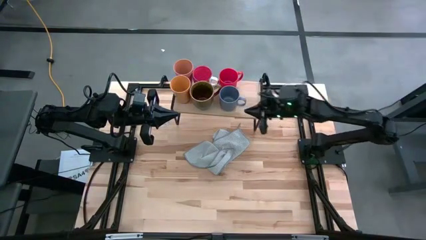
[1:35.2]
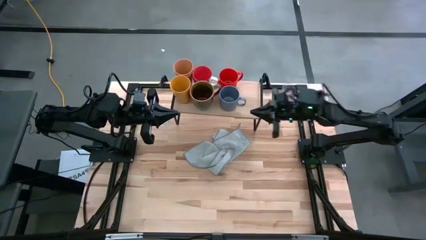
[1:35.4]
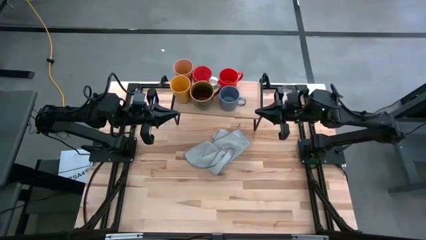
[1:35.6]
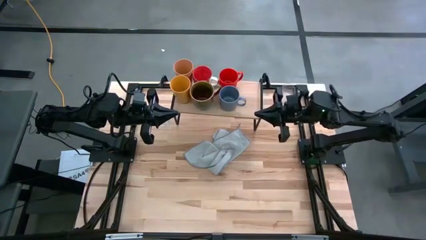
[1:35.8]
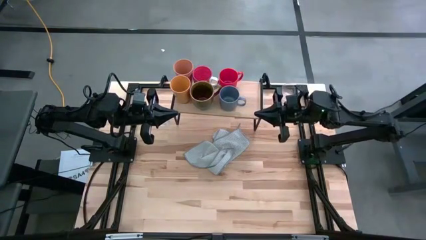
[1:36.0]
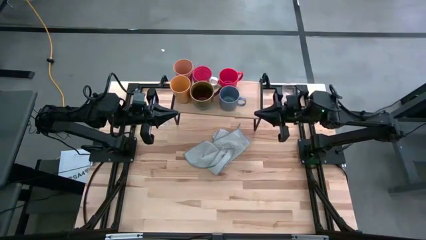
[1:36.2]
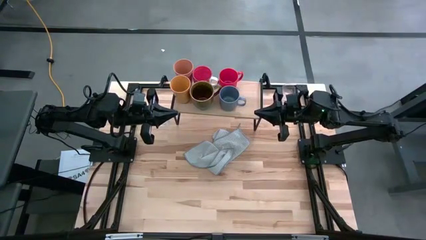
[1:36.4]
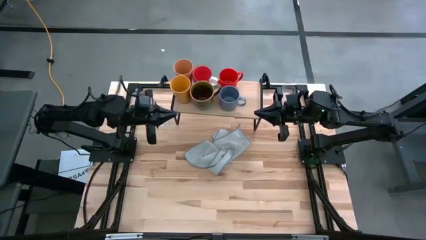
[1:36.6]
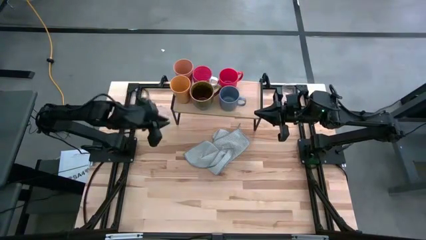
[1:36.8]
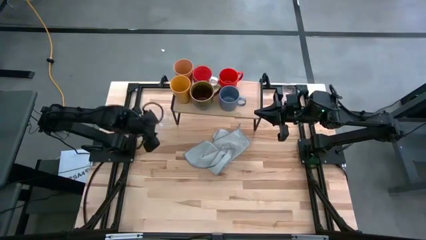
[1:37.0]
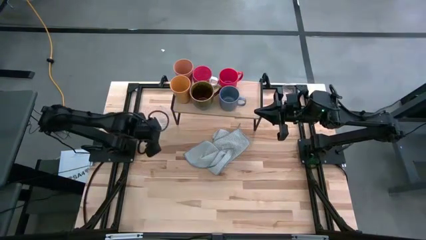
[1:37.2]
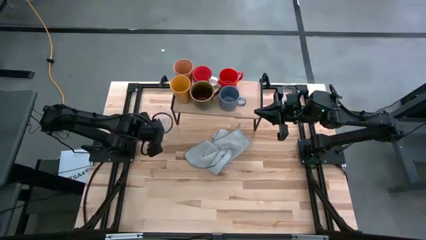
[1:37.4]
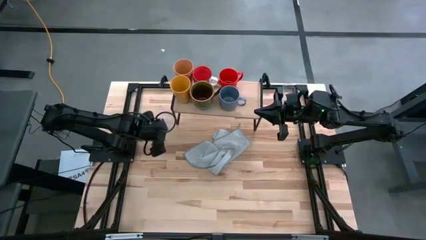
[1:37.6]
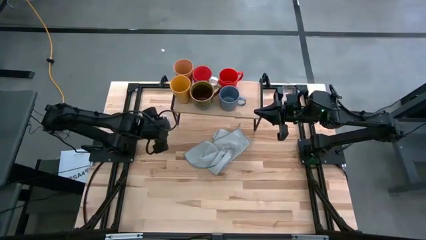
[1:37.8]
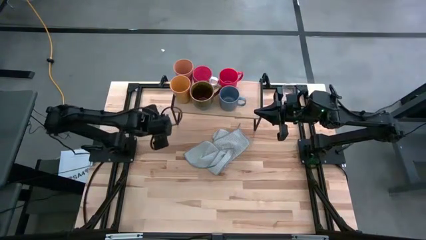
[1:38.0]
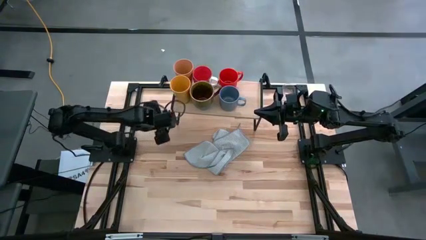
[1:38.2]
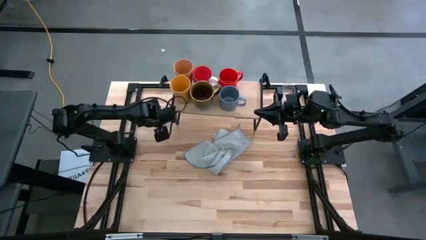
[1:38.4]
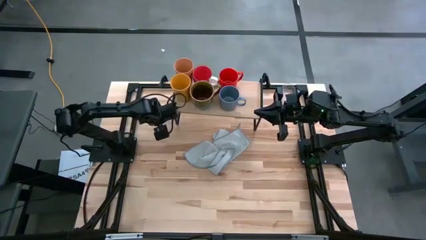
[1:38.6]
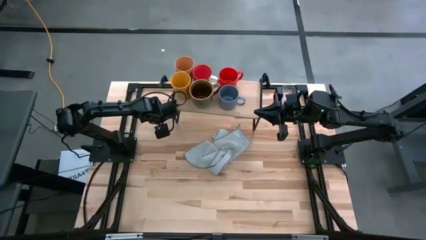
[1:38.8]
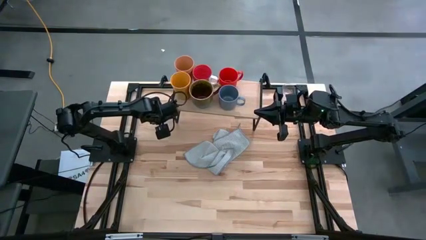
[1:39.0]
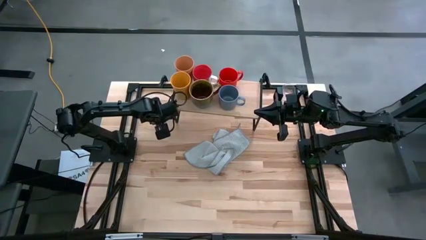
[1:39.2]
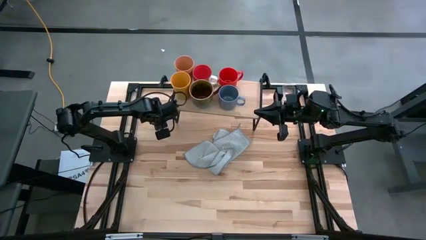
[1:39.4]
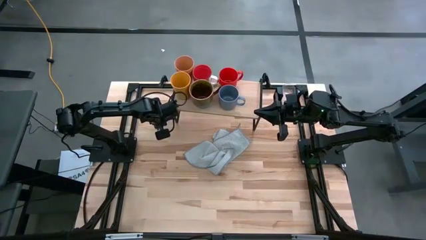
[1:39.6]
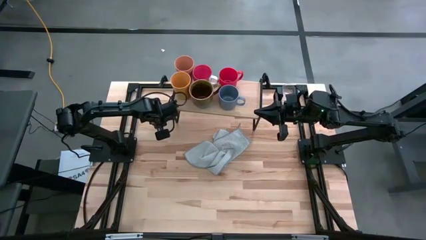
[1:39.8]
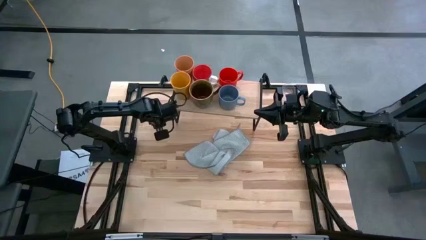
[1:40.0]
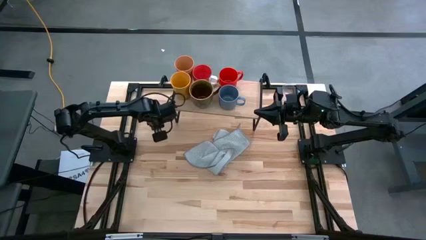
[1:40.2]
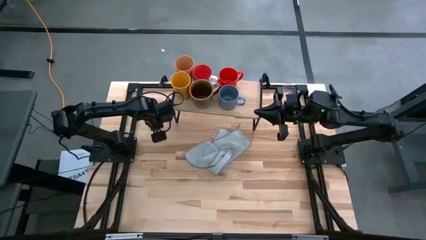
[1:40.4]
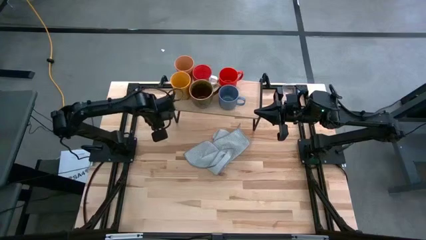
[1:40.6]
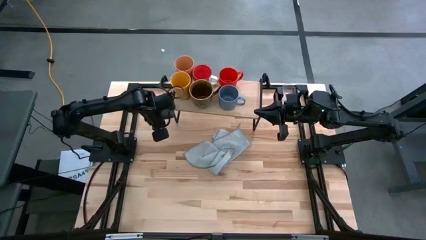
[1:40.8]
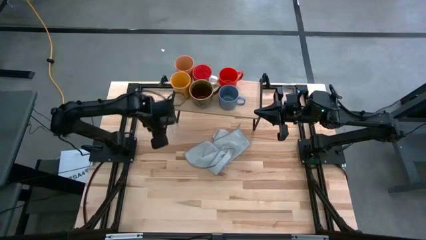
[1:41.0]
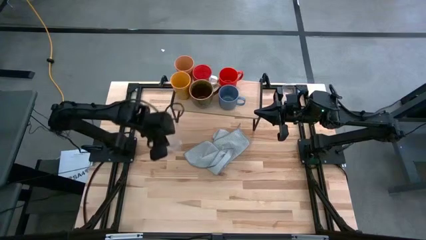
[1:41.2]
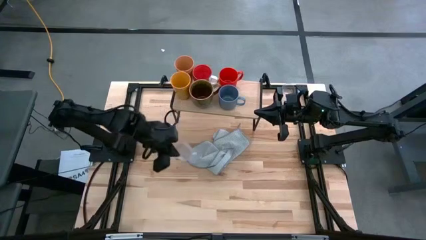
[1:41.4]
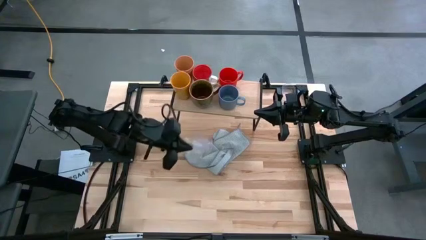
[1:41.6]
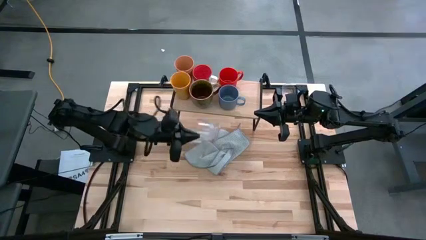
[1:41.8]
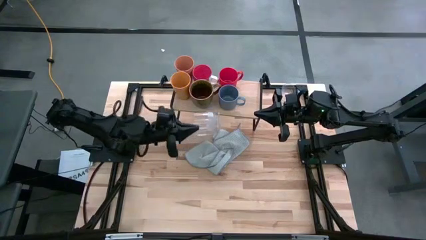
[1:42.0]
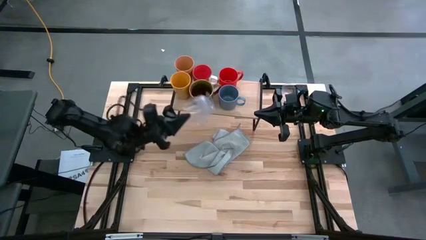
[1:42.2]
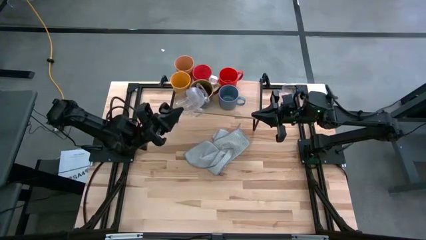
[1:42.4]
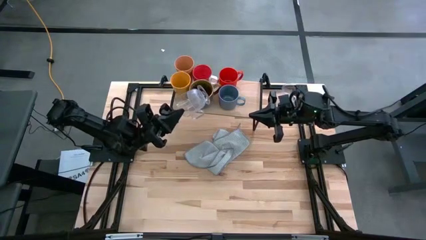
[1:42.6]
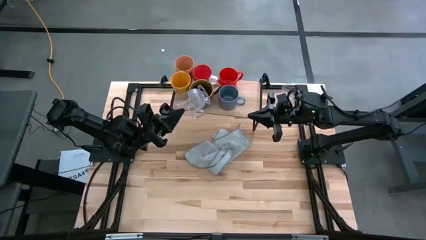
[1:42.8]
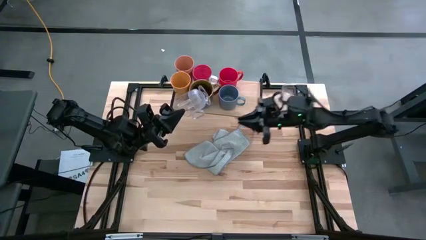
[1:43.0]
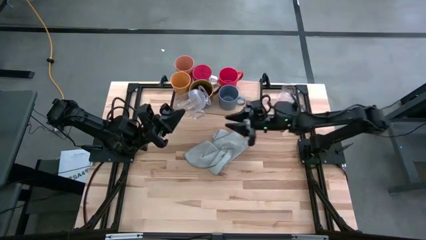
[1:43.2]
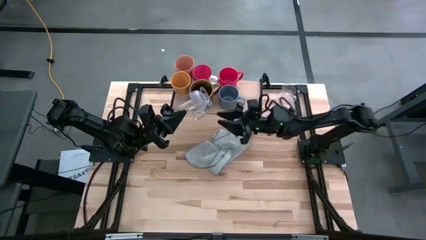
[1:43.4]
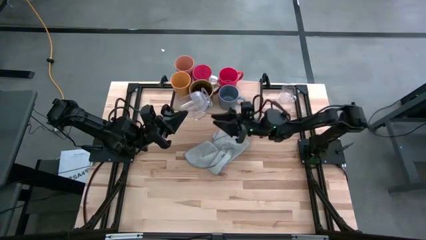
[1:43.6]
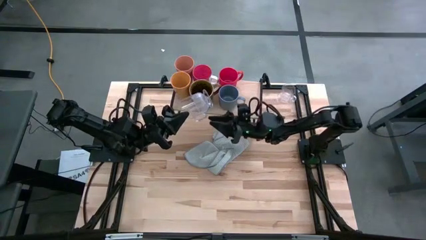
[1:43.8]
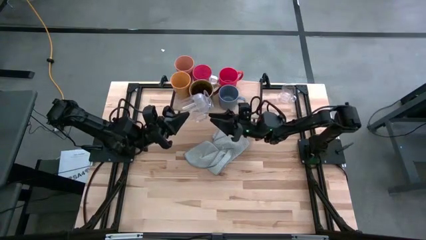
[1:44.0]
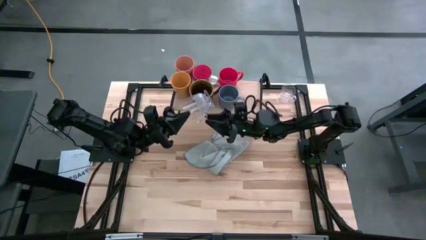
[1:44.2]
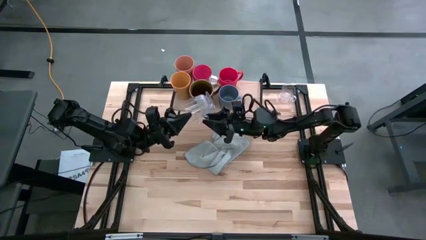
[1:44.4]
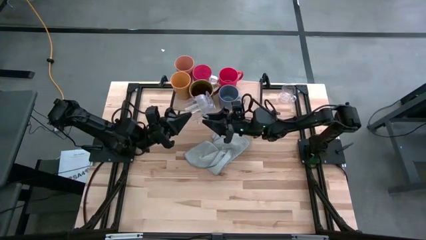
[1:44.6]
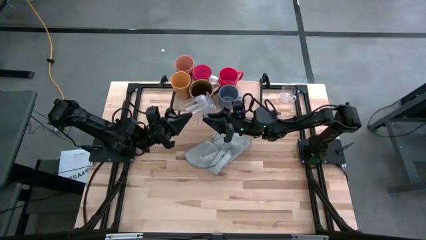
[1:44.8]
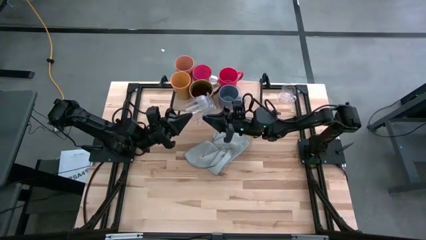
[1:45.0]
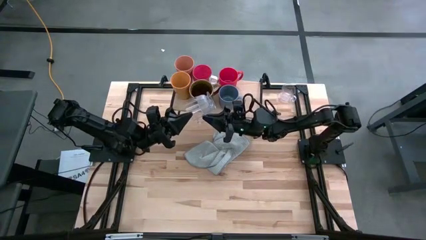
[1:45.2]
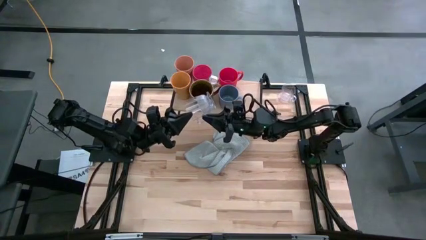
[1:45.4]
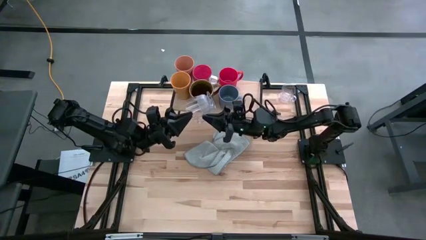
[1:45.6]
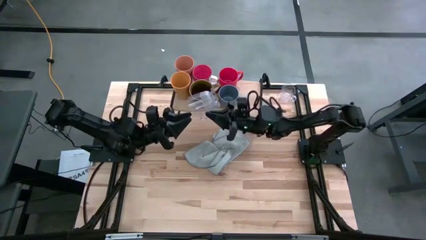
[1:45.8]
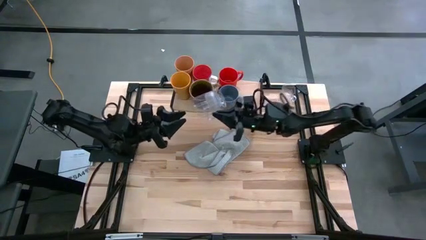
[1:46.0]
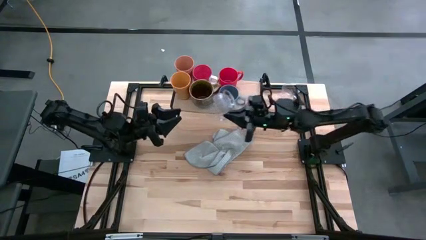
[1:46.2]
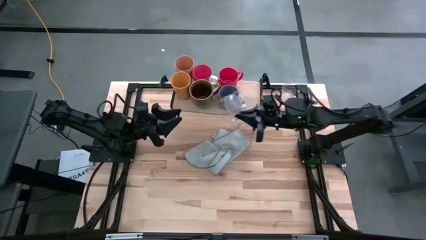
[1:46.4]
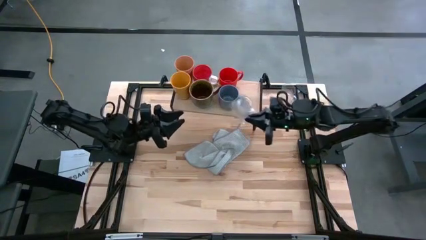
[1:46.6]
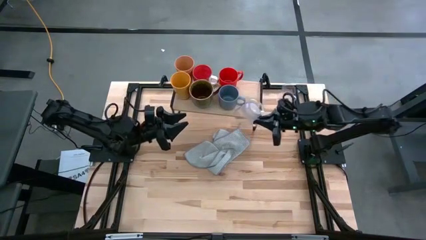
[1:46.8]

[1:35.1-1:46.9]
Task: Stack small to large cups/mugs on shelf
Put the left transparent mug on the shelf

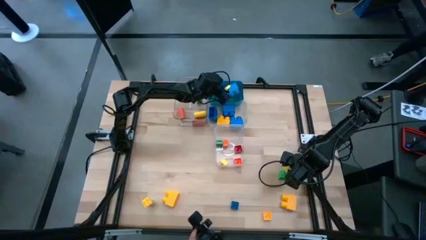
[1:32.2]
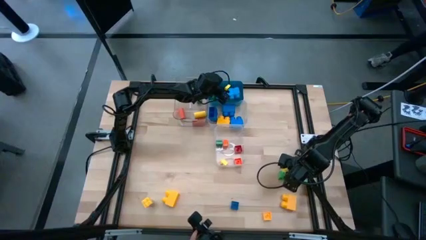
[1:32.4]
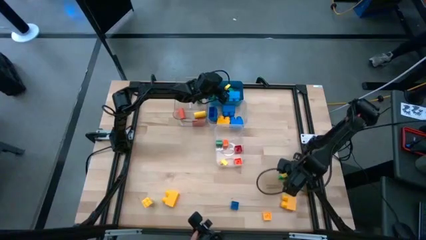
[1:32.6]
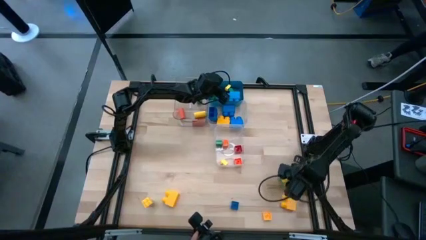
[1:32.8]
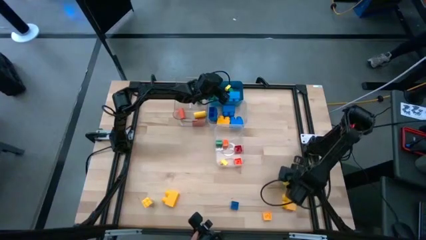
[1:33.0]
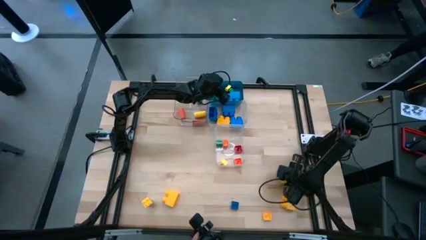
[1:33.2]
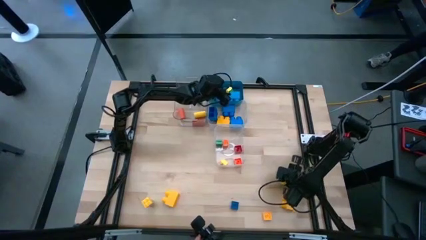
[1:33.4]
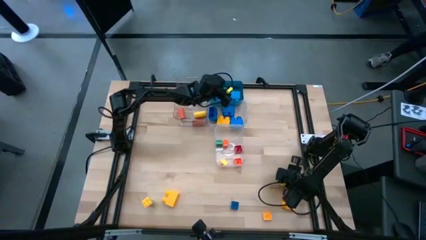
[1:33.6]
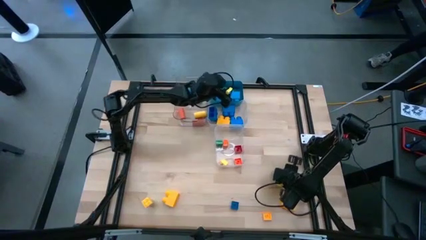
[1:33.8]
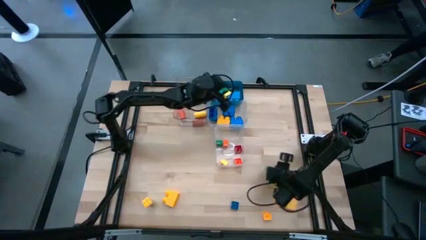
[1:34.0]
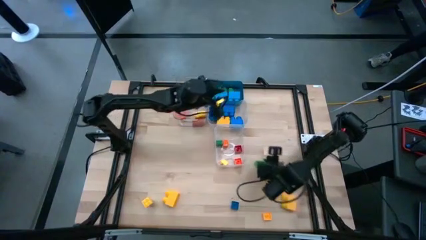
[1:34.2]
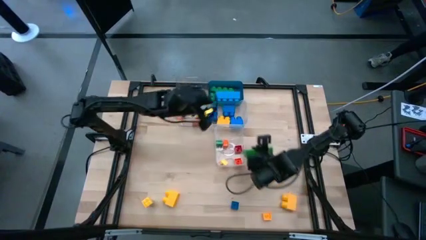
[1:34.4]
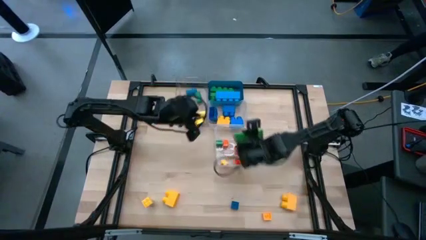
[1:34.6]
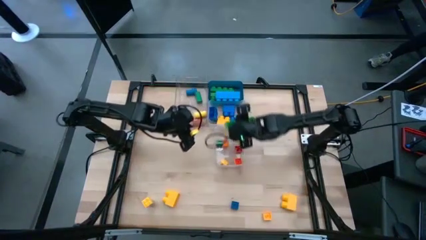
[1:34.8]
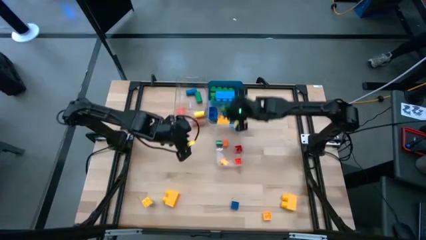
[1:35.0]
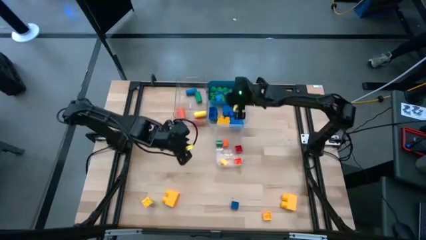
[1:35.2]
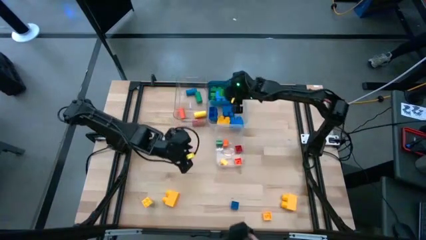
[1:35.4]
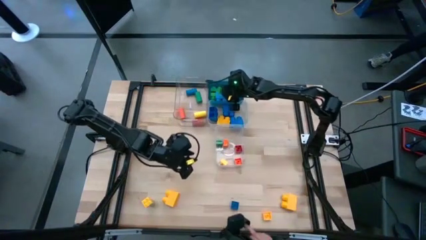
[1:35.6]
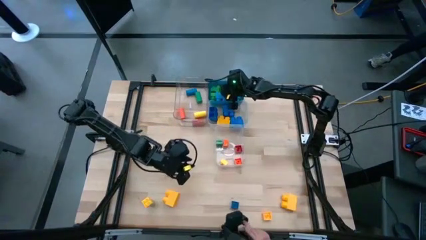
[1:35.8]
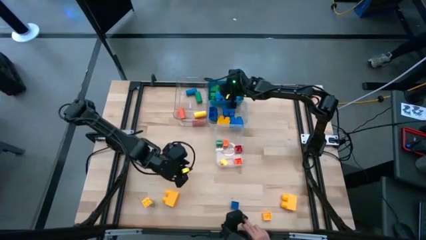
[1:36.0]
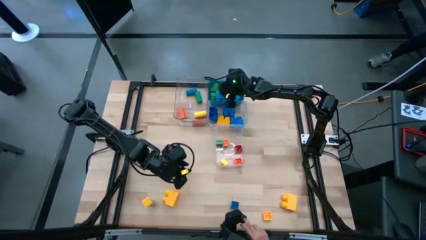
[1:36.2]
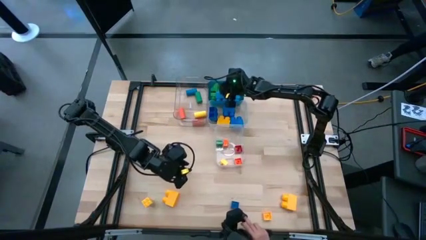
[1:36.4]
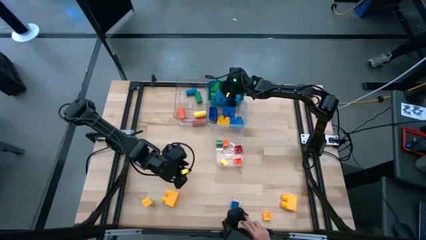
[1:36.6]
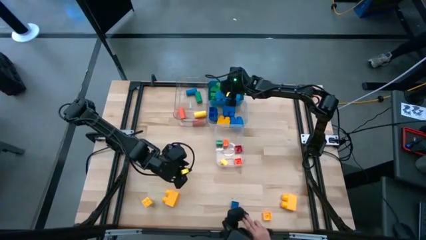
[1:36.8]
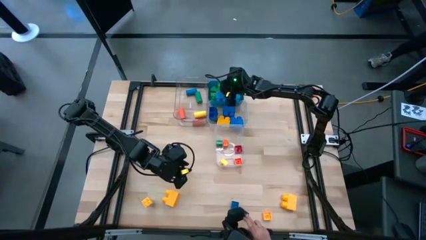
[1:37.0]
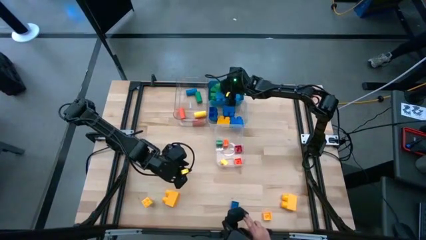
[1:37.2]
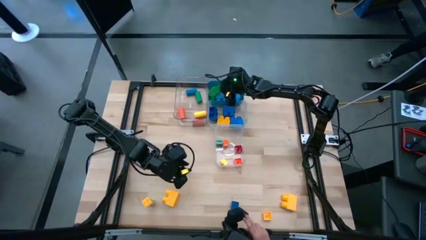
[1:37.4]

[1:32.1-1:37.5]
Task: Sort blocks by size
Put the green 4 stud large game piece into the blue bin
